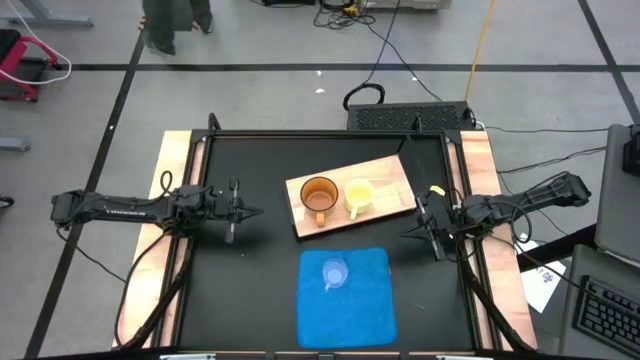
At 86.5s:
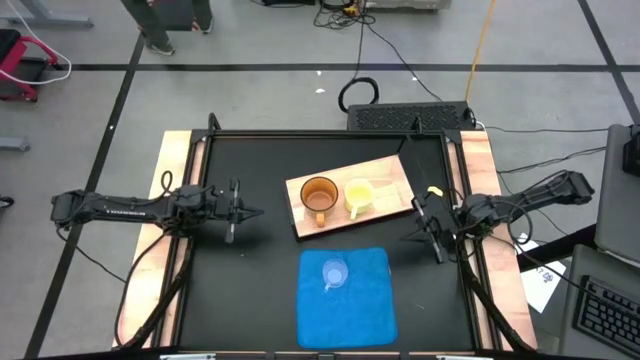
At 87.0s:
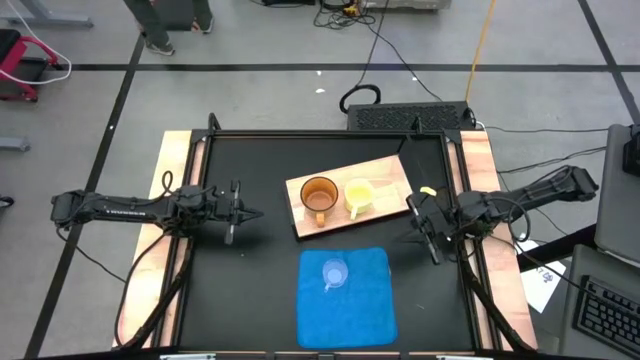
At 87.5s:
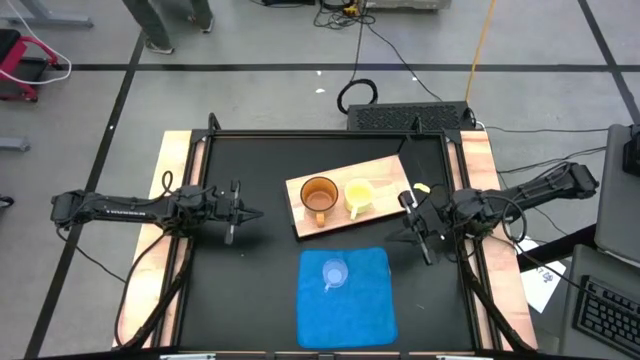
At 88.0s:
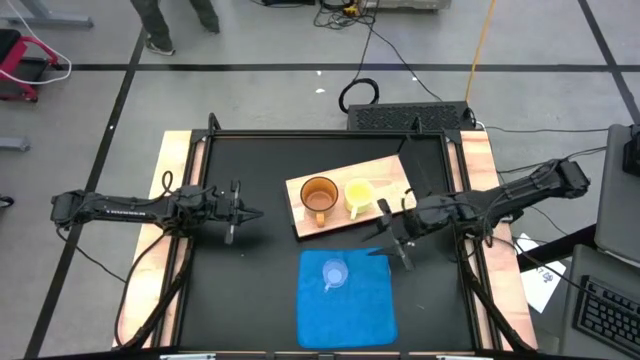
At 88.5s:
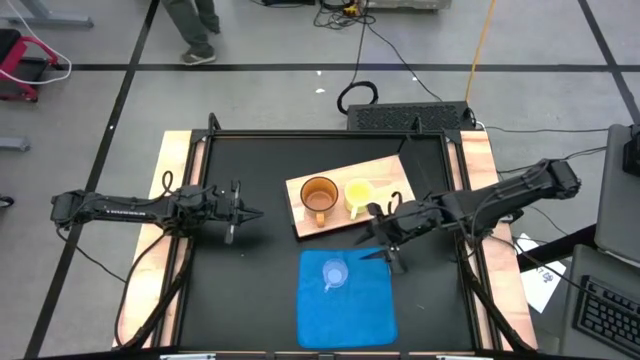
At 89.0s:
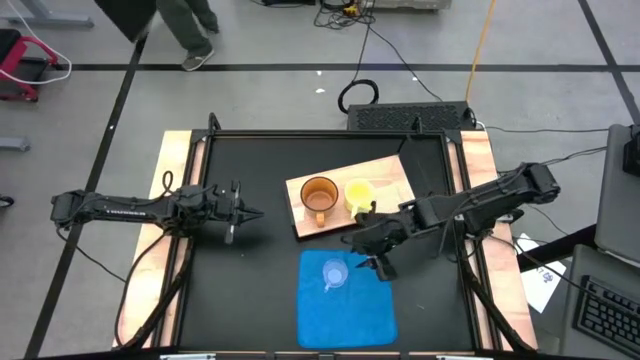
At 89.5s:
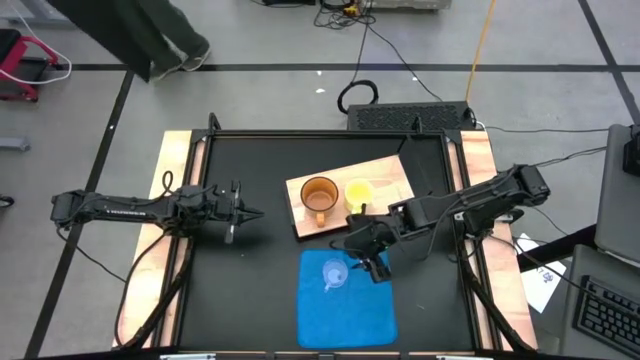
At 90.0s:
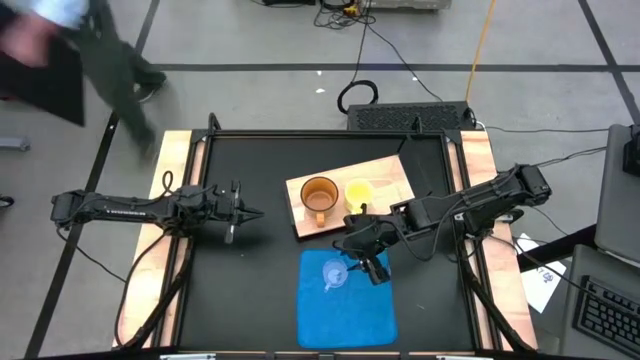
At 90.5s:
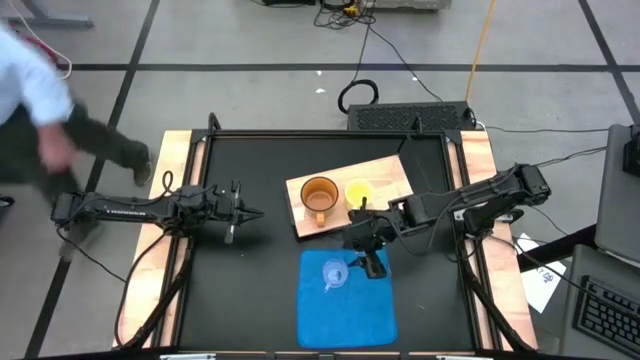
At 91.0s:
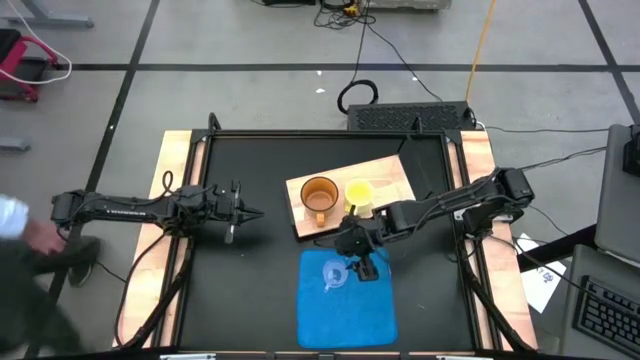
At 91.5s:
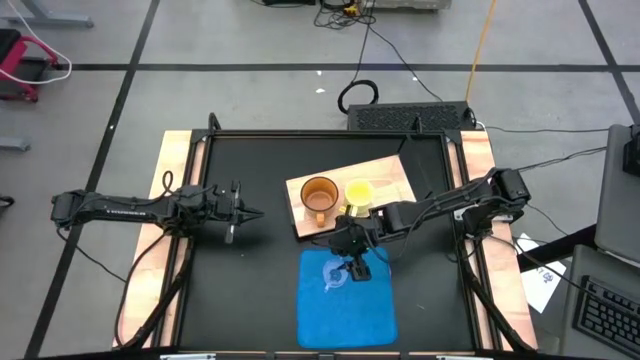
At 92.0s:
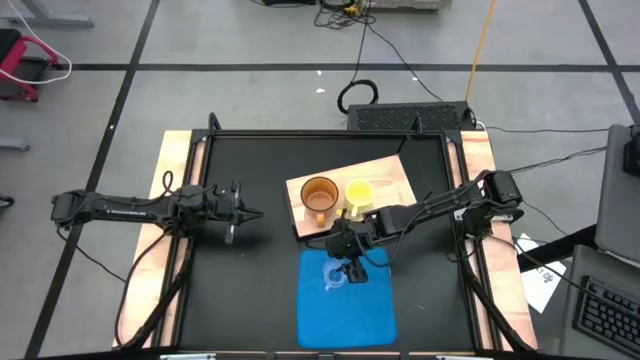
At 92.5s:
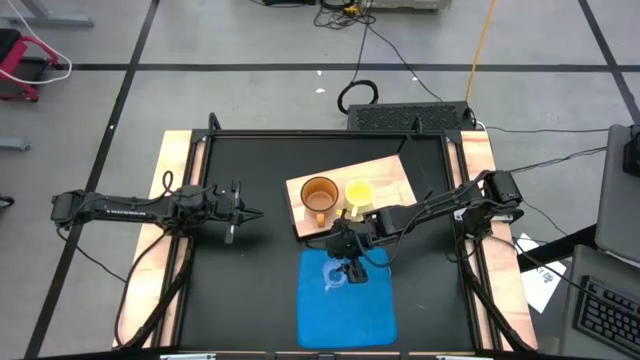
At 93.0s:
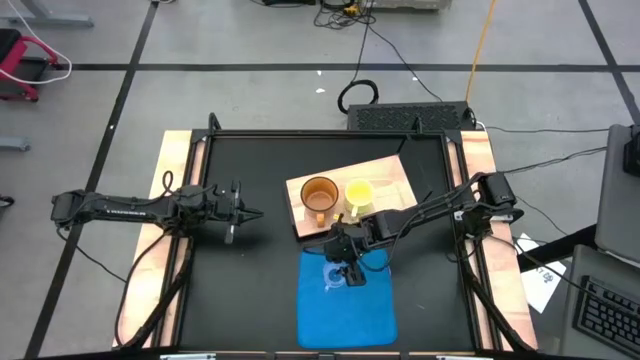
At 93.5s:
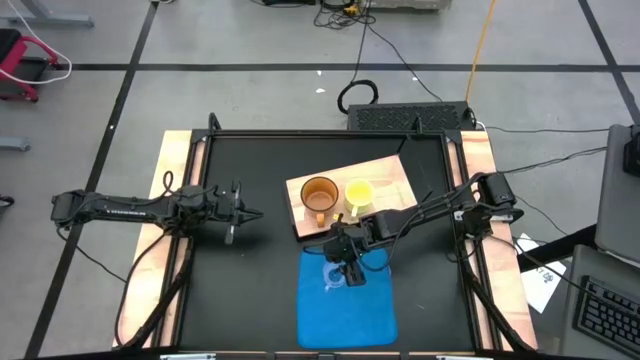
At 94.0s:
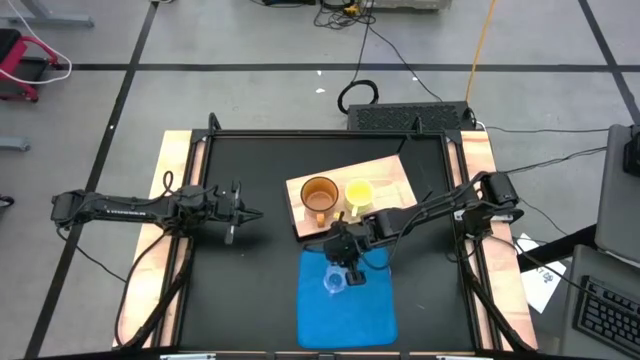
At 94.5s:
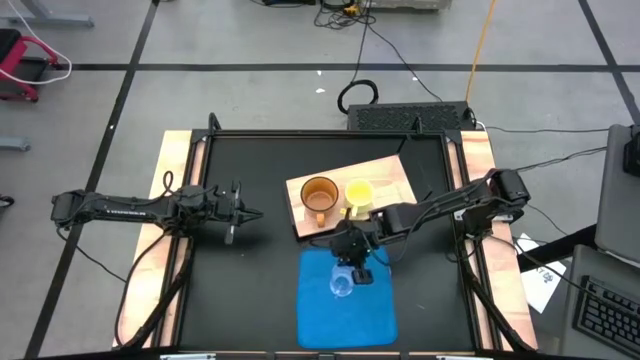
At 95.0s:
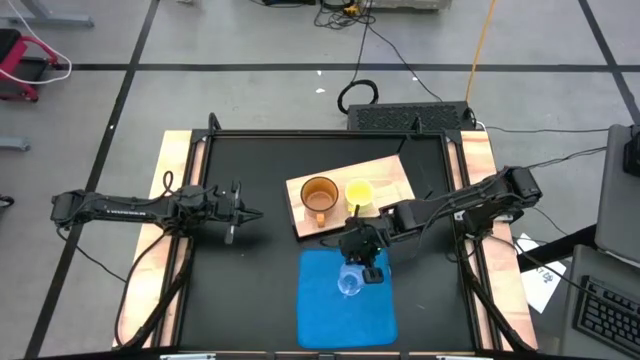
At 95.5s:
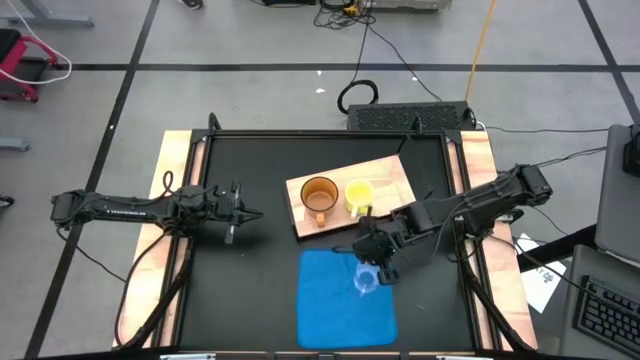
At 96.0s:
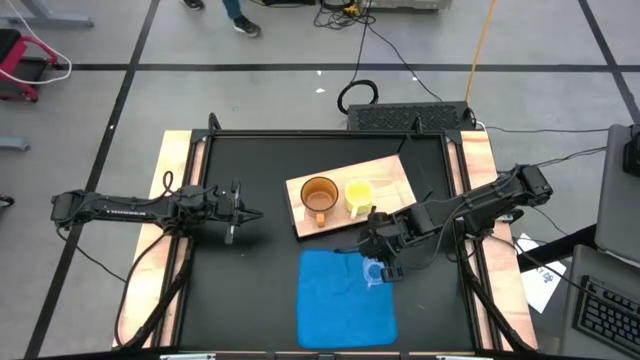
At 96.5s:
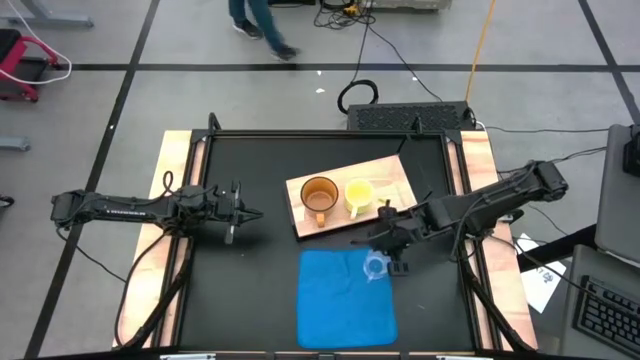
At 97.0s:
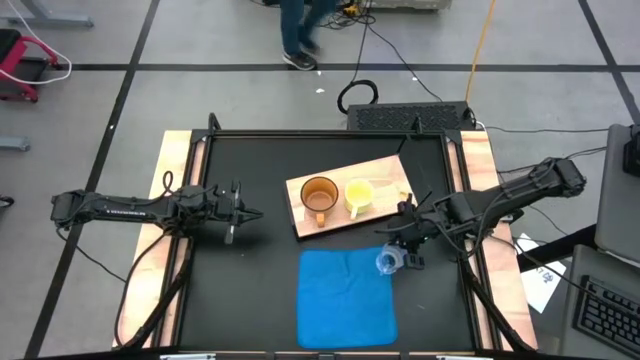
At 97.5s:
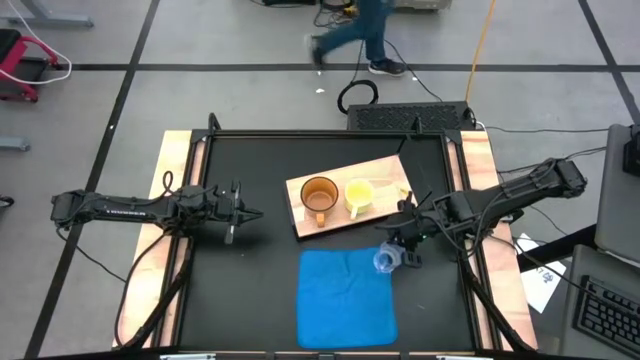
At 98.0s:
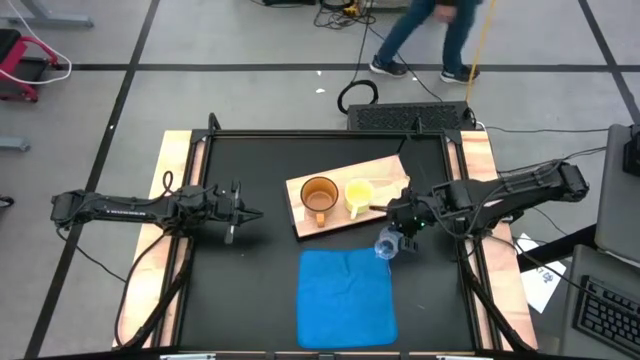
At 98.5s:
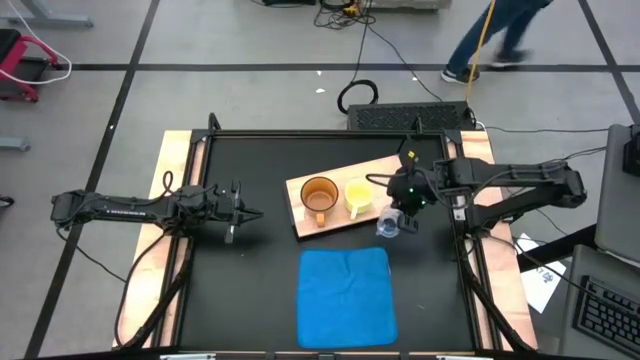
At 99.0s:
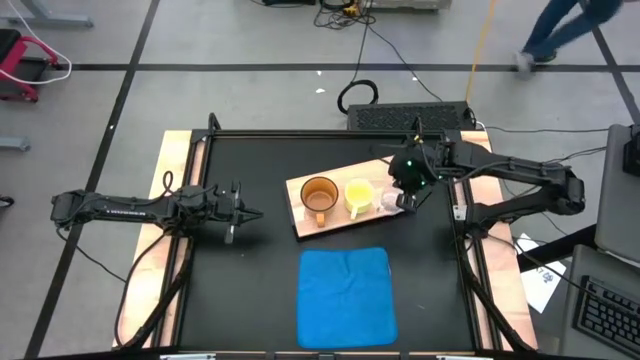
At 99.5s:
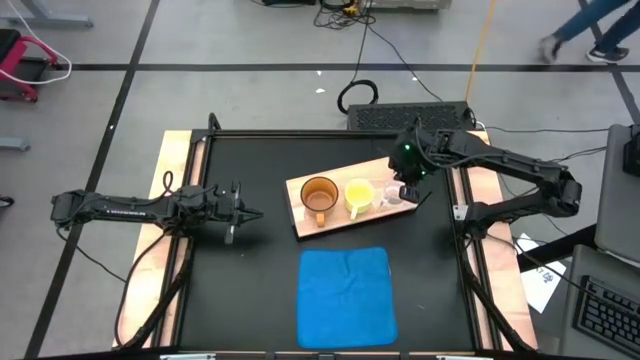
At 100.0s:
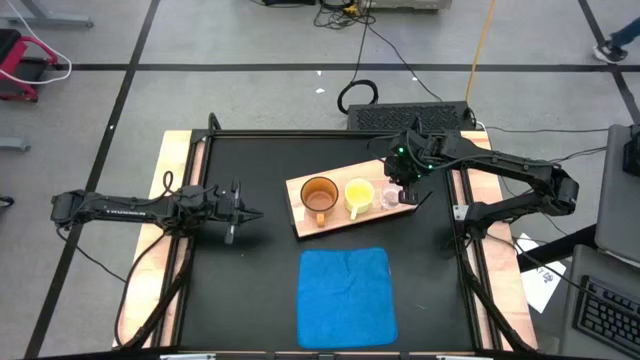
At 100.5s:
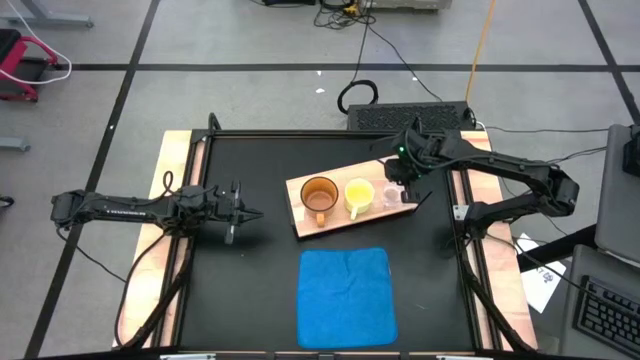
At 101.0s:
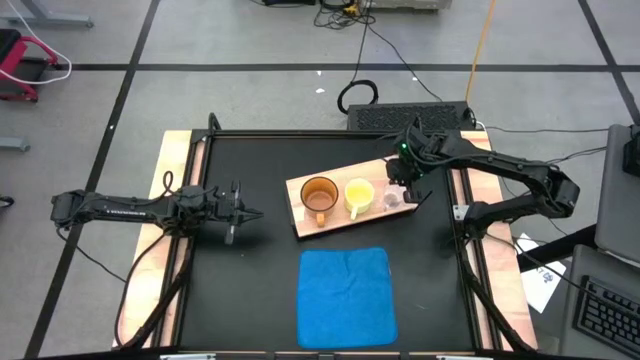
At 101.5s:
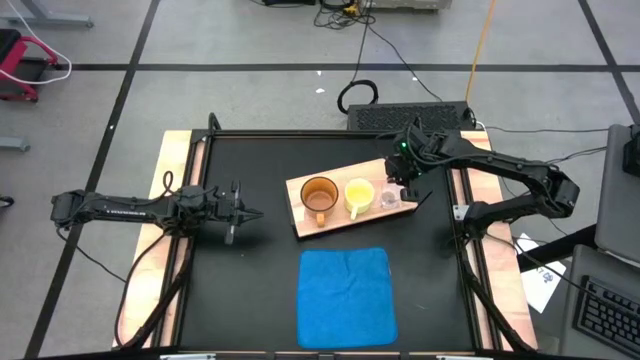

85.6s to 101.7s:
Task: Stack small to large cups/mugs on shelf
Put the transparent mug on the shelf
